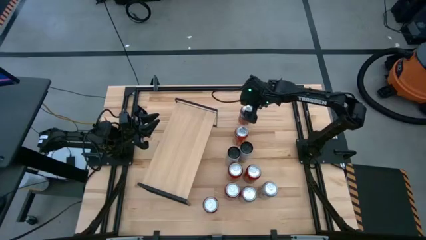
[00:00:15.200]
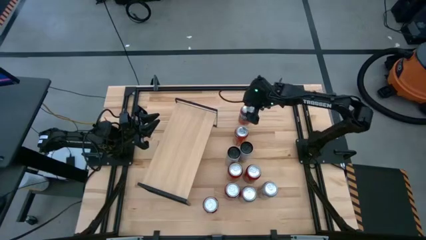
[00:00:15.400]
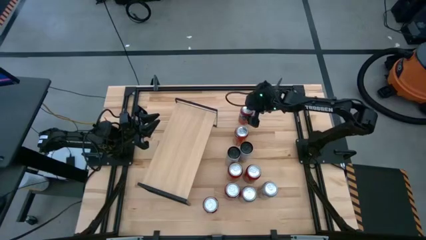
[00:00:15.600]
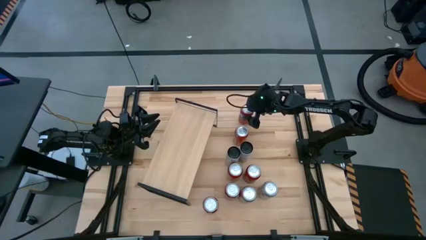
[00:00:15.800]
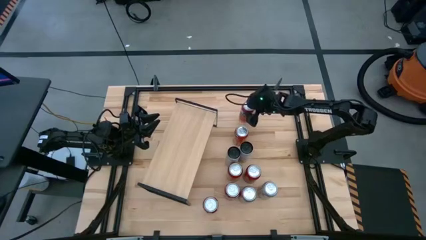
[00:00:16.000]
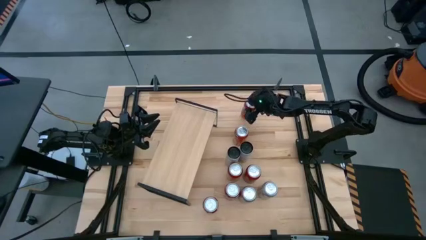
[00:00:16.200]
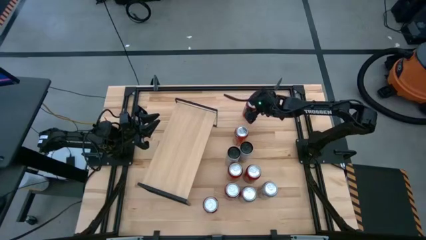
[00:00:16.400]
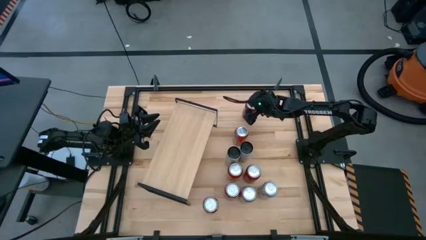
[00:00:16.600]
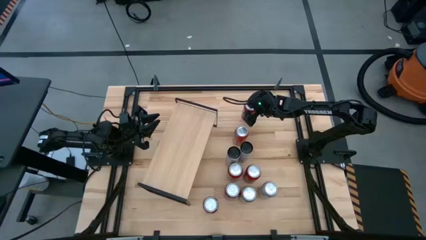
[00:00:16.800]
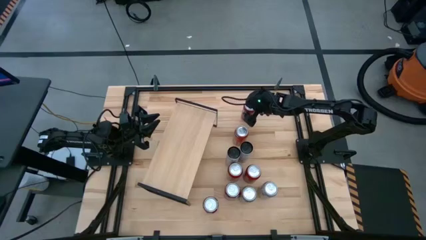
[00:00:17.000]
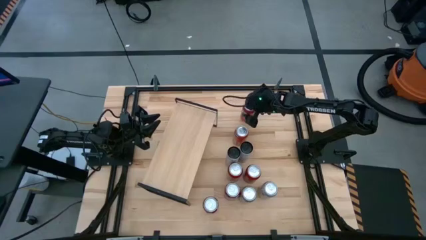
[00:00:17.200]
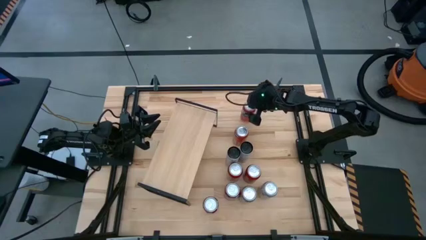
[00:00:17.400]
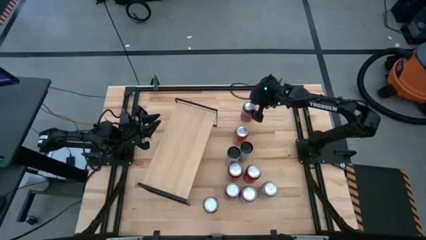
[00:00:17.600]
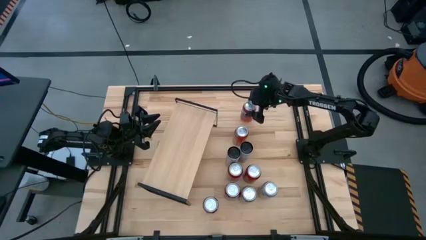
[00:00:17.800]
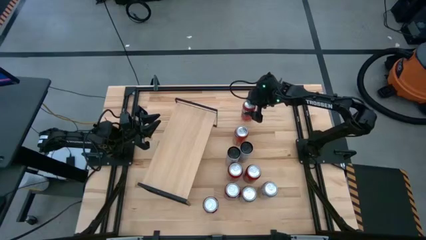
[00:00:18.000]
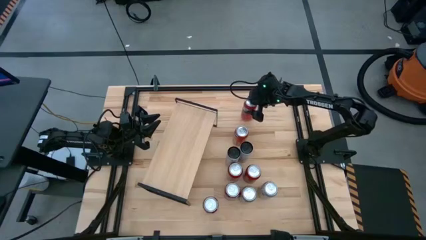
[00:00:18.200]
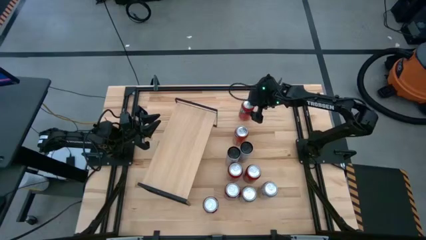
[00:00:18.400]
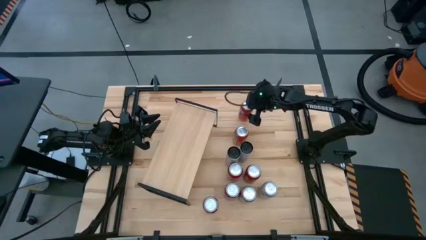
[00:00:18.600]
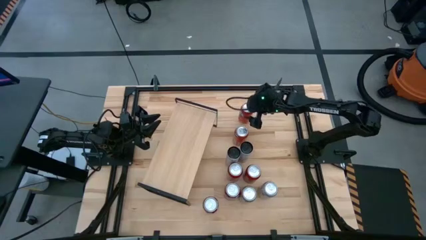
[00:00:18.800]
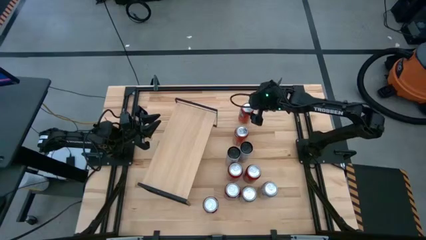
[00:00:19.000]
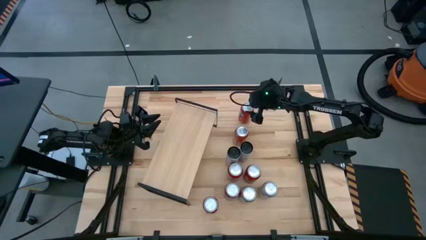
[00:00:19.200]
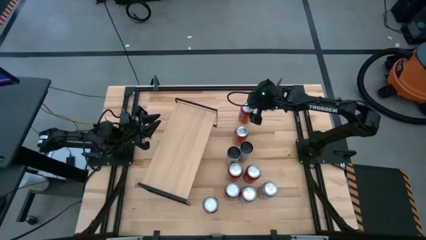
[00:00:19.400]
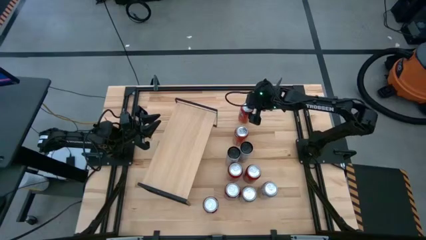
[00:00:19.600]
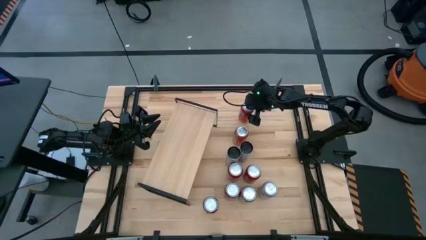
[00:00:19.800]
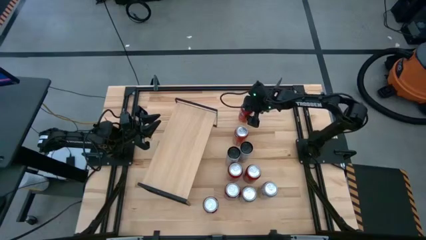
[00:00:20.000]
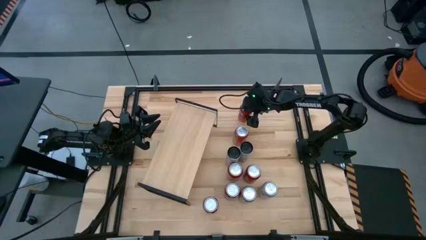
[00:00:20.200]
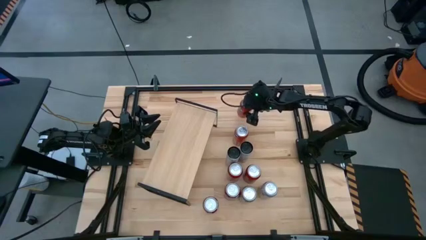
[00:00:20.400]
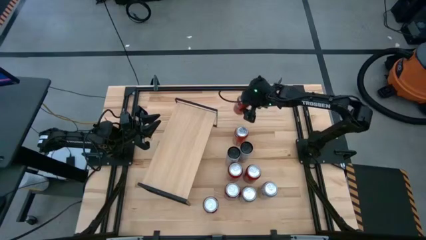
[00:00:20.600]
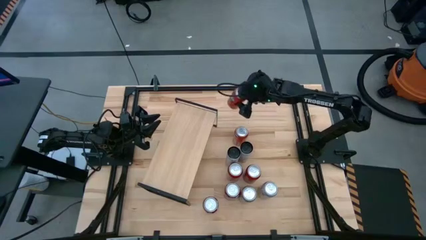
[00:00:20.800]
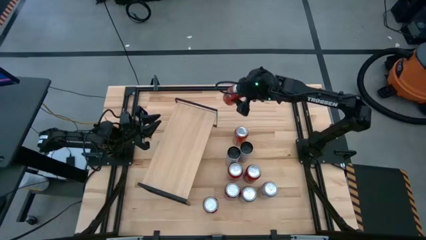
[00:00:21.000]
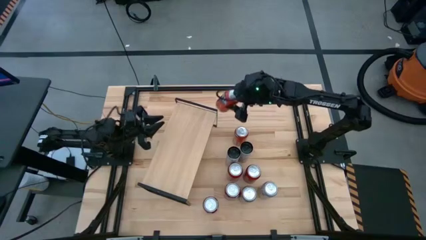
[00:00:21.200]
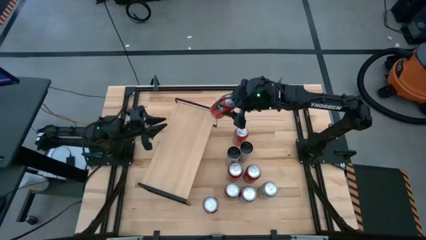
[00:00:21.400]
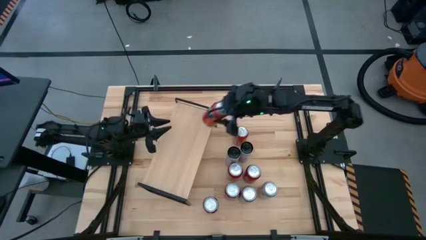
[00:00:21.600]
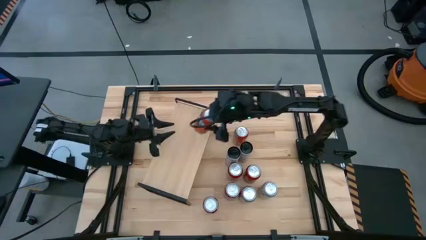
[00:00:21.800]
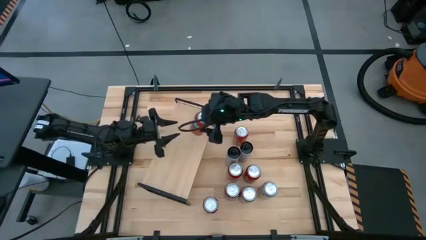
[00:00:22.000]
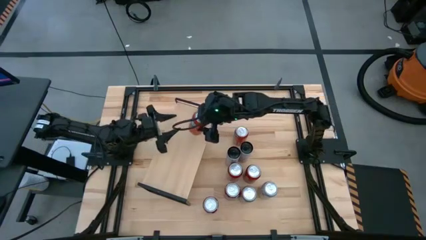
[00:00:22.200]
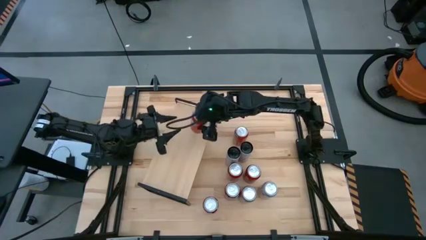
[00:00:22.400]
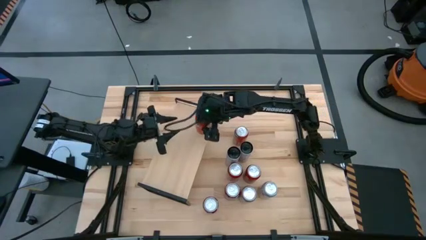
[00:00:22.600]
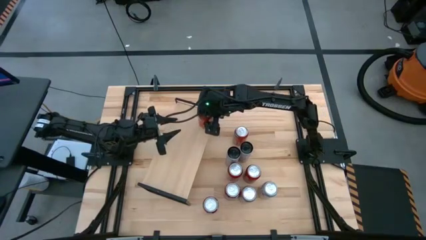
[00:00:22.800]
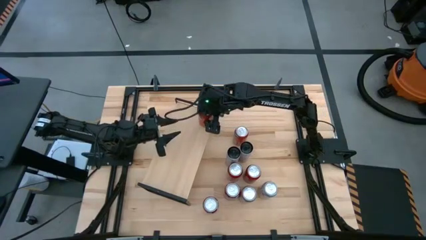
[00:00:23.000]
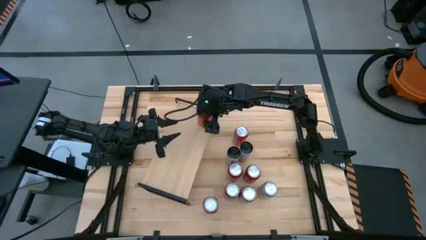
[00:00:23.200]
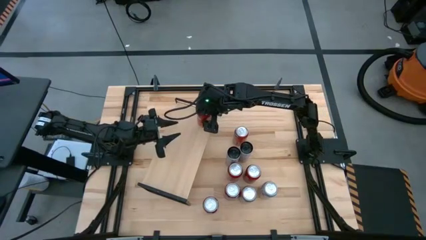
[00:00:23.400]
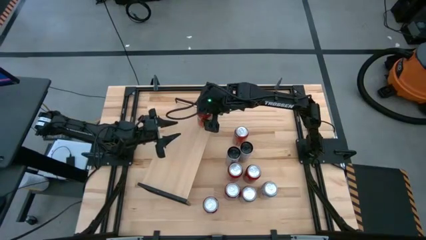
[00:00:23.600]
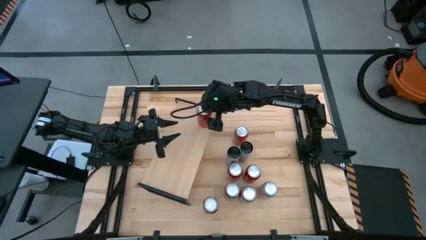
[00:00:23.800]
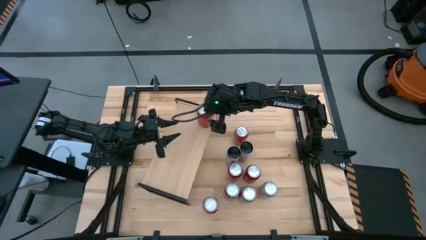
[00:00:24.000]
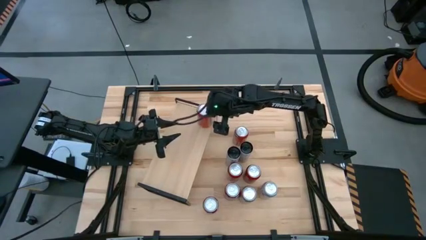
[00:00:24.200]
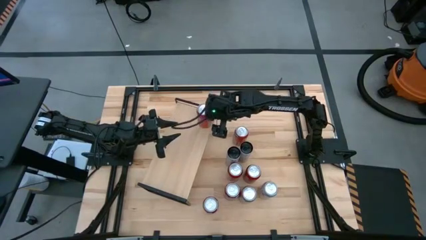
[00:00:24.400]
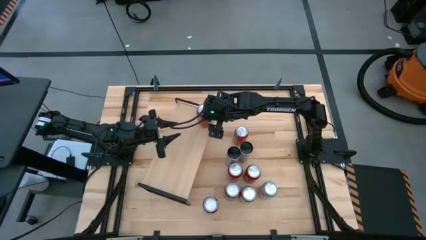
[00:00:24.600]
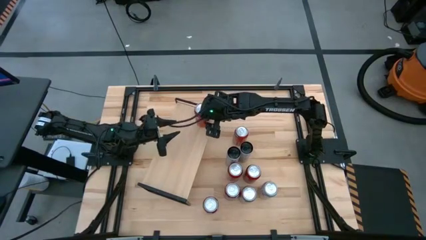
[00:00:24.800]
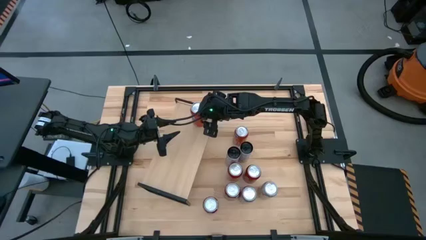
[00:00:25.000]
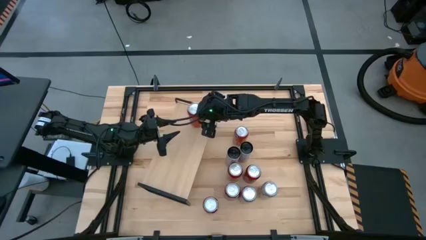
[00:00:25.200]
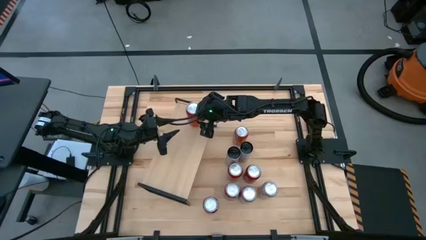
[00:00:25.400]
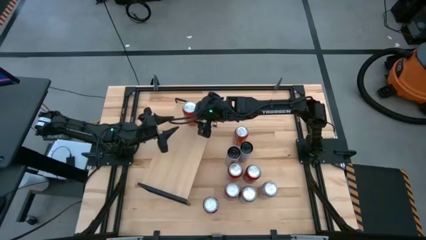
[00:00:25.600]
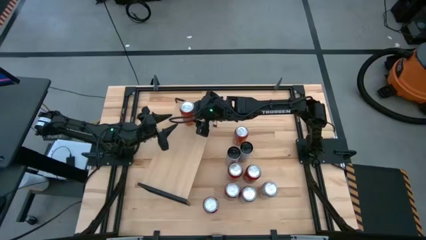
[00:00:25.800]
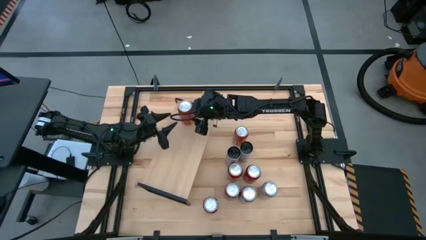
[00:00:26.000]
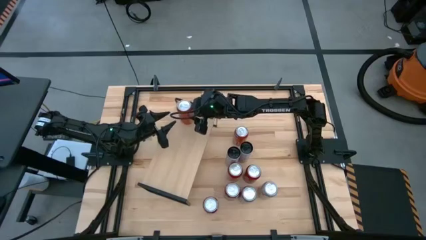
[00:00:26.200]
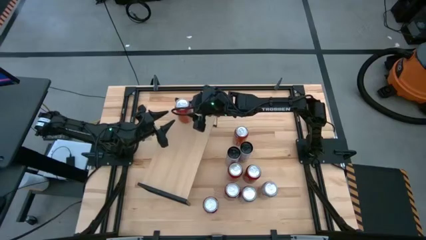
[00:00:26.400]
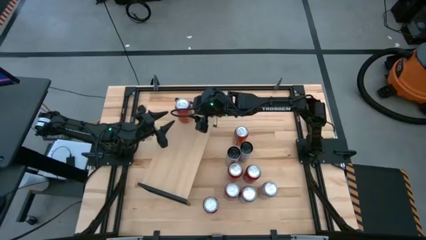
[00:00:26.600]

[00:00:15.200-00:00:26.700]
Task: Place canned beverage on shelf
Put the top orange soda can on the shelf
